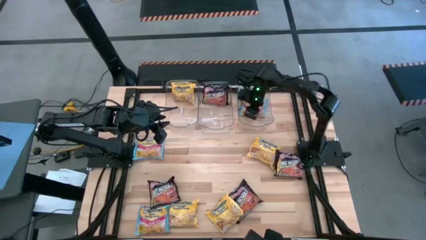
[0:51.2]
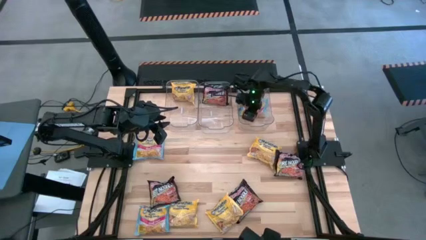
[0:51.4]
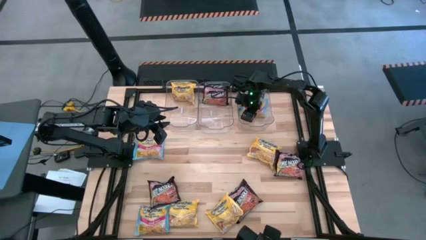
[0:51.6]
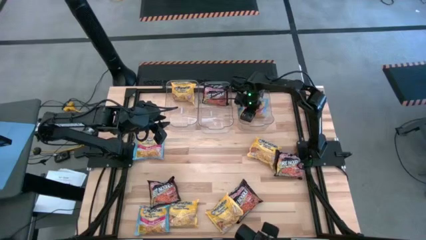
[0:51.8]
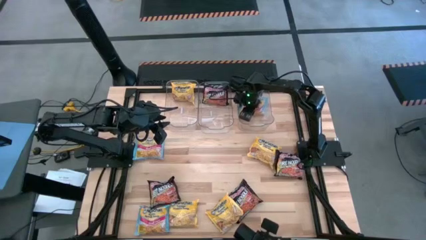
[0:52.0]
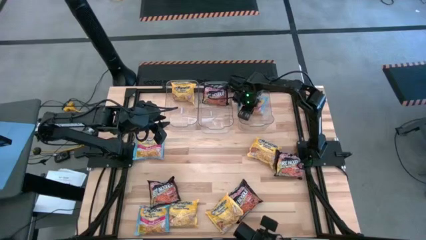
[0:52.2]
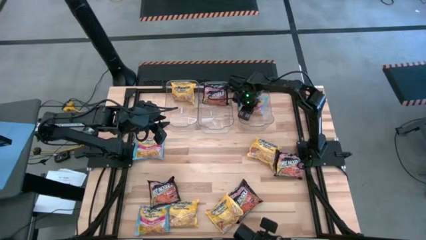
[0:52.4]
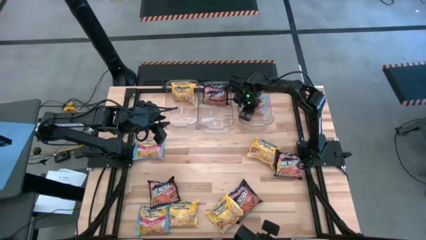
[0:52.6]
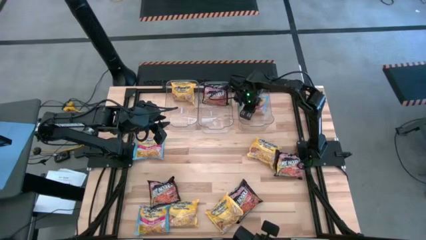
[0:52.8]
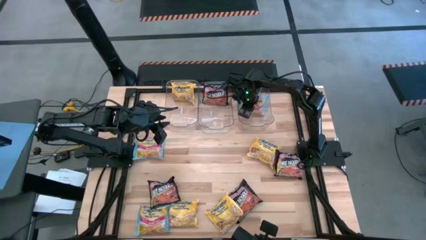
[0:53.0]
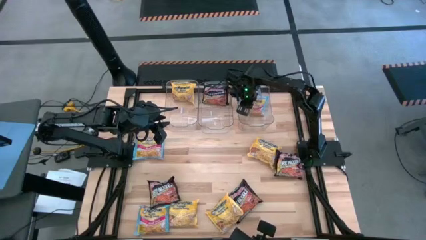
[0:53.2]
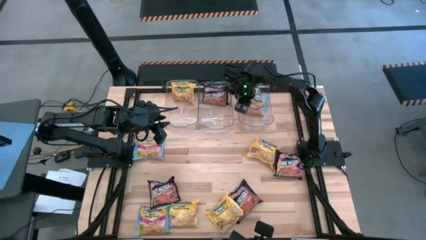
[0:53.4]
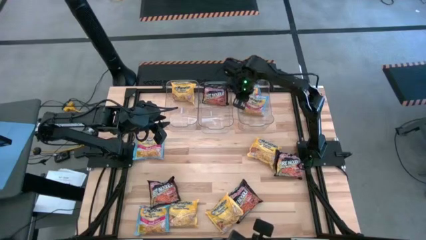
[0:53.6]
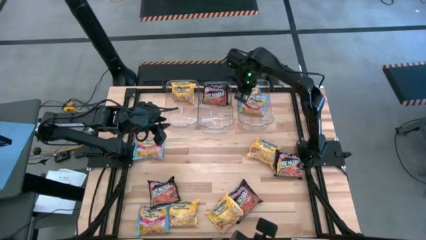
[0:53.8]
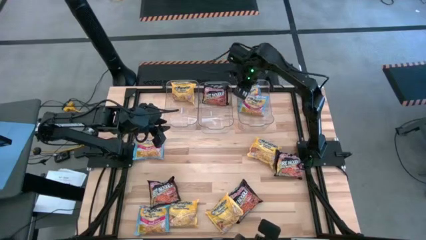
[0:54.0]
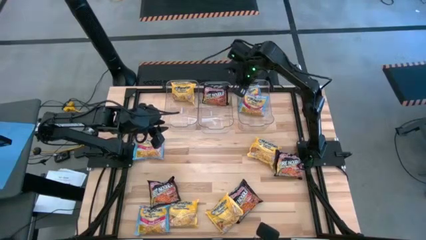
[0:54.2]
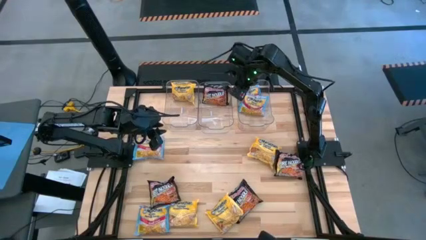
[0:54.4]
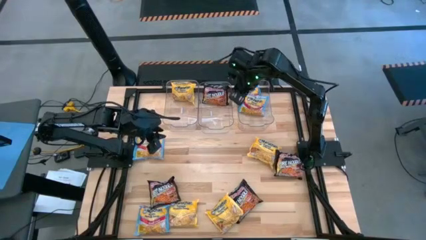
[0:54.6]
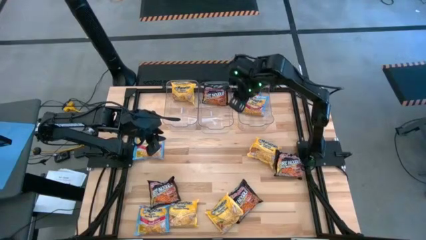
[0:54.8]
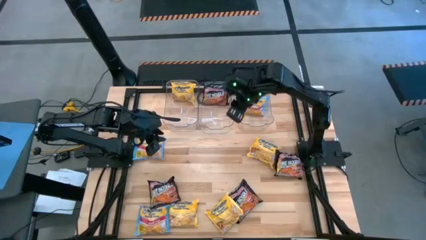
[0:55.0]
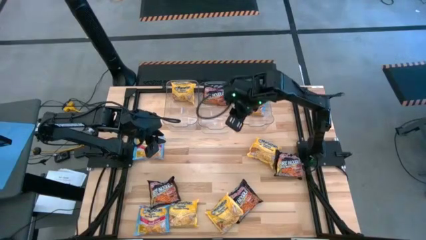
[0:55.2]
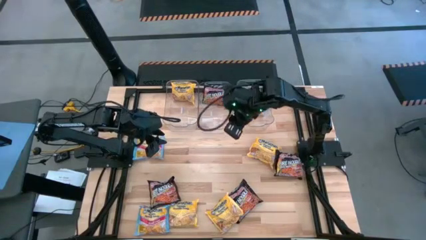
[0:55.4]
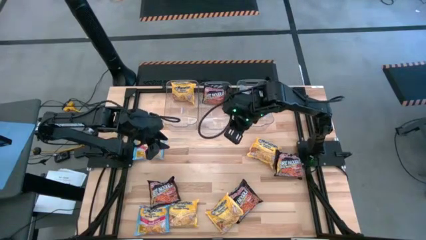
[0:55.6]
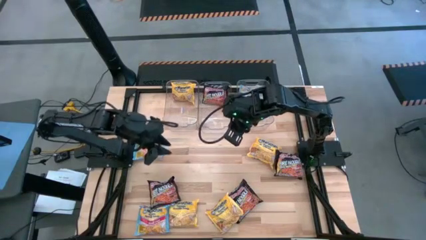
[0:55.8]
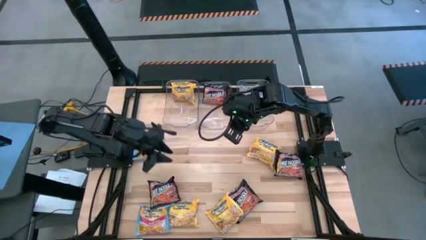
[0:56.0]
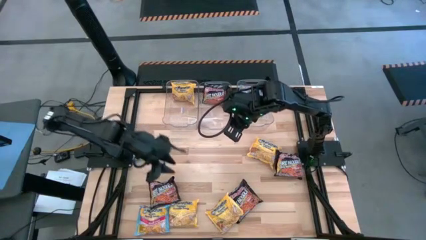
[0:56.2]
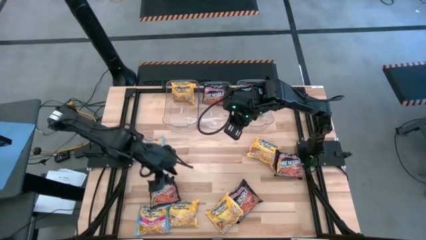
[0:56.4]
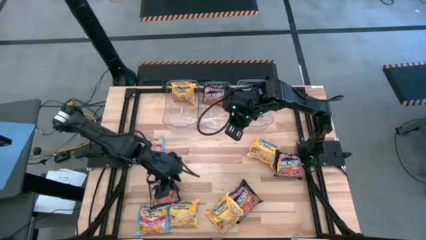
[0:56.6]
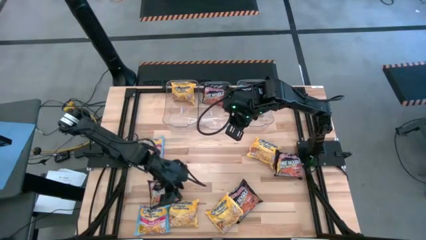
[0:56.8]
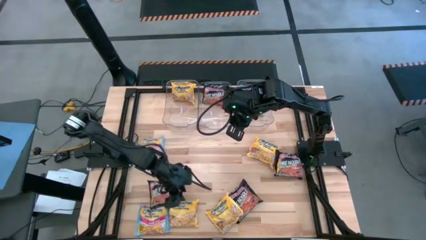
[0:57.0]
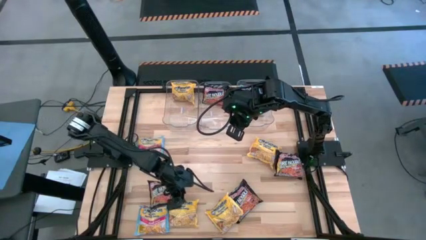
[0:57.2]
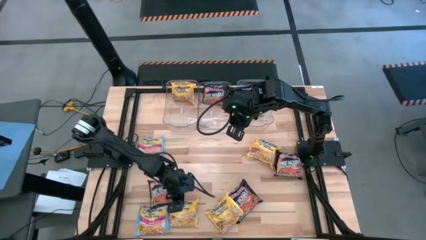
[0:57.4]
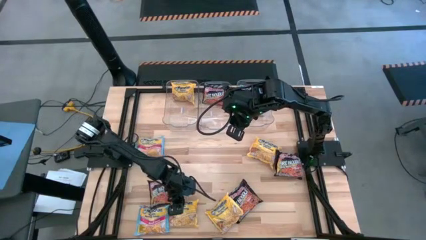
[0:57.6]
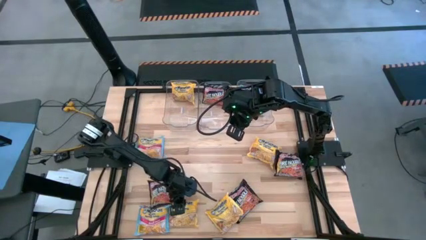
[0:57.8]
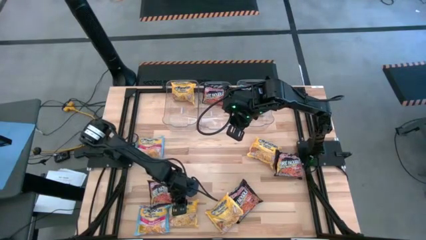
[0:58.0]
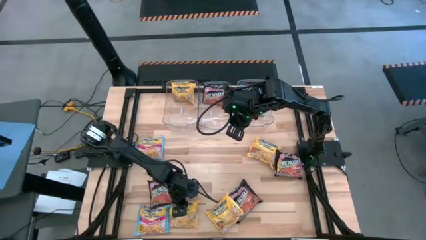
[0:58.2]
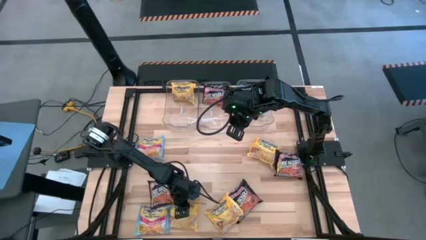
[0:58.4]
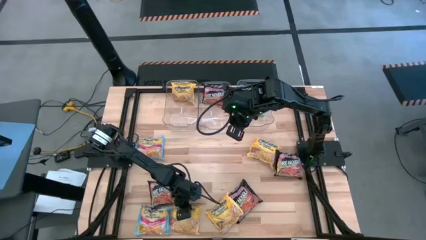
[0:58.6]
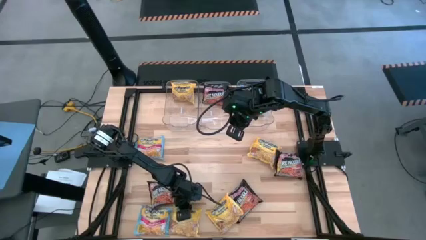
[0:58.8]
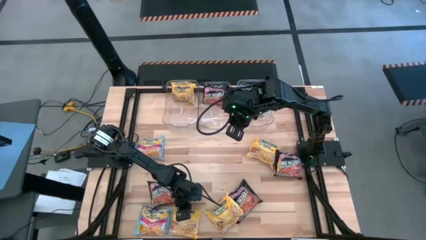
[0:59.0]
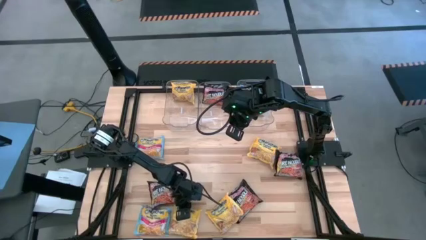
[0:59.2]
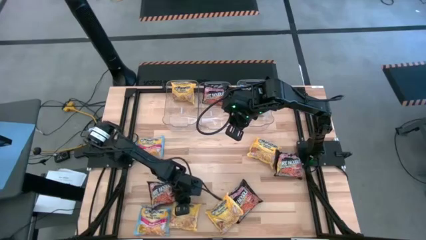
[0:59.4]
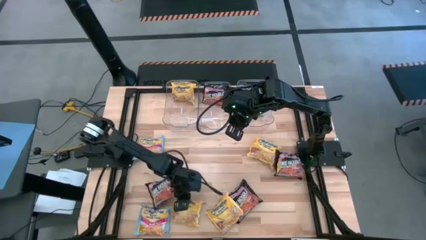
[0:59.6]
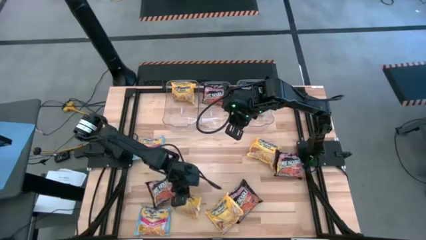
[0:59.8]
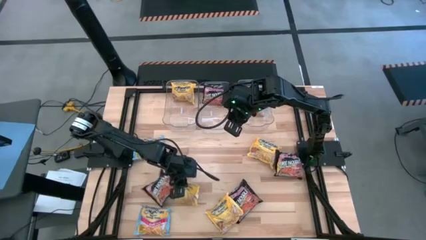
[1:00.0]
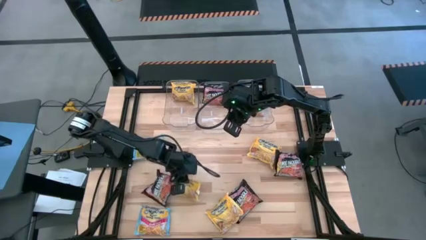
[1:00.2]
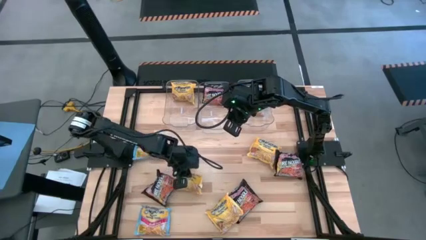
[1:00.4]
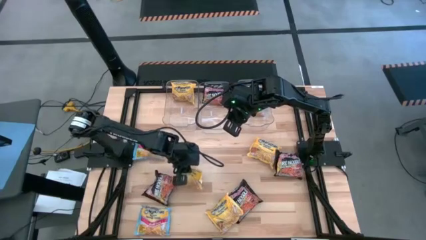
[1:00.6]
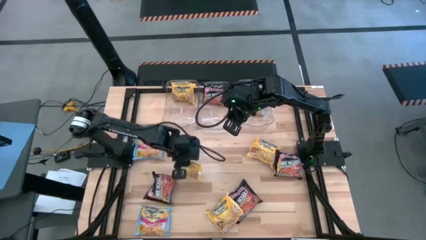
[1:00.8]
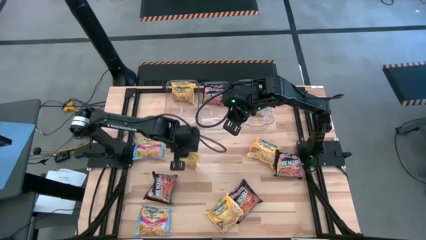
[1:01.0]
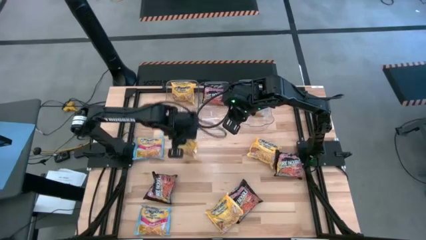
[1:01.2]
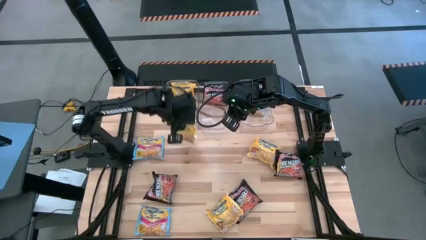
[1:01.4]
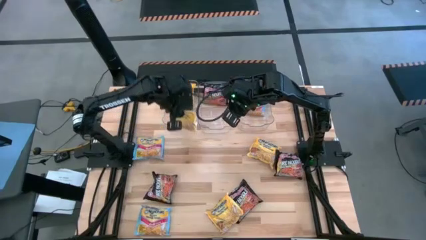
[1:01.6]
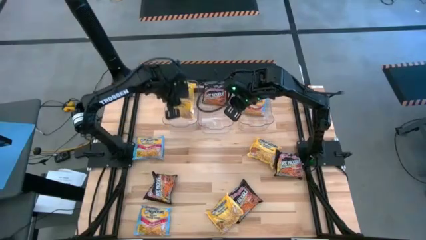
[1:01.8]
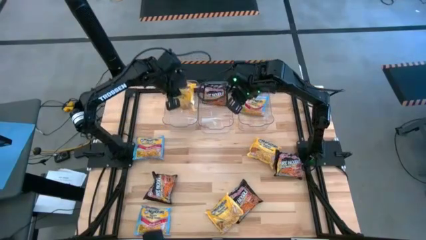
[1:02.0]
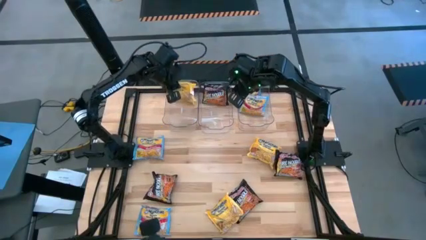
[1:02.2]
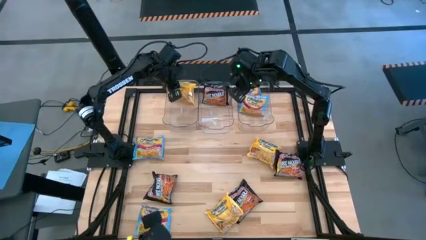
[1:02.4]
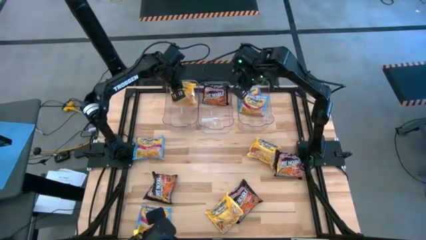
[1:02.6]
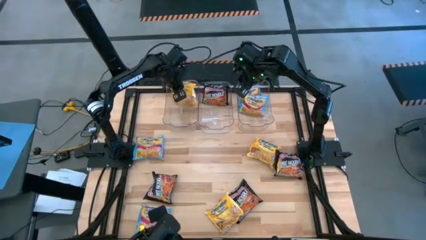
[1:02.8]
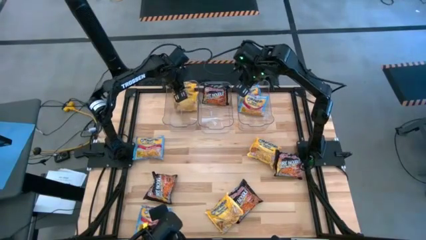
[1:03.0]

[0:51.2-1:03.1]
Task: Sort Maruchan noodles
Put the yellow noodle pack in the left transparent bin

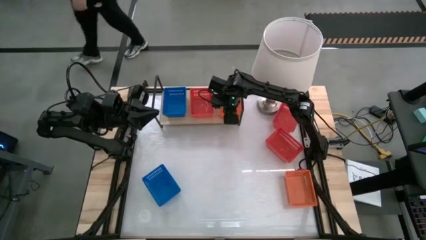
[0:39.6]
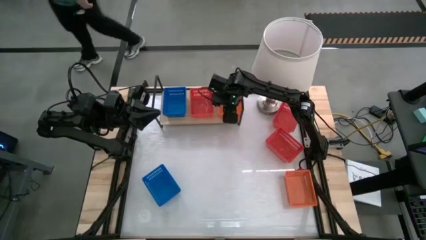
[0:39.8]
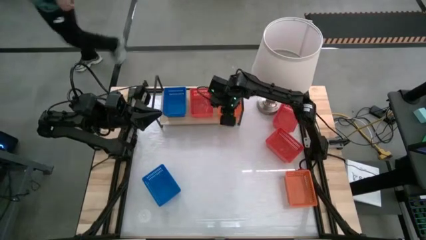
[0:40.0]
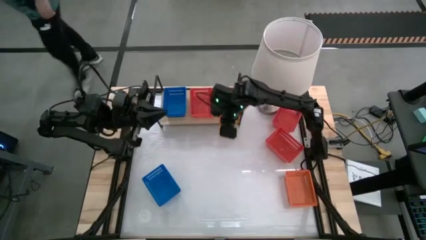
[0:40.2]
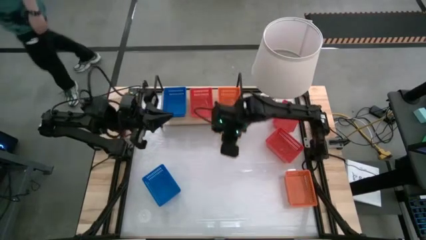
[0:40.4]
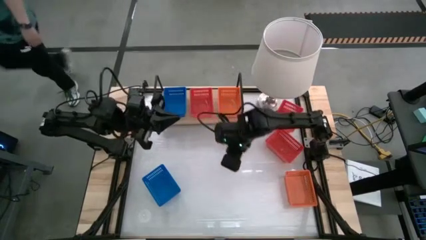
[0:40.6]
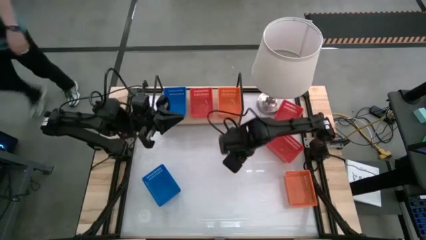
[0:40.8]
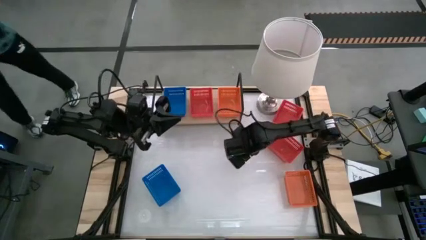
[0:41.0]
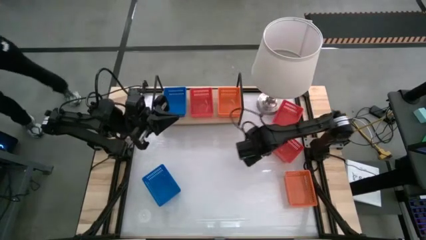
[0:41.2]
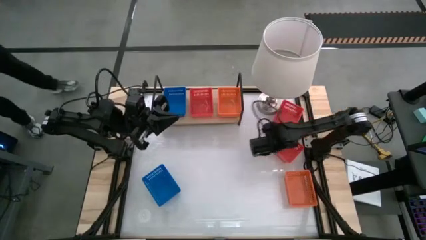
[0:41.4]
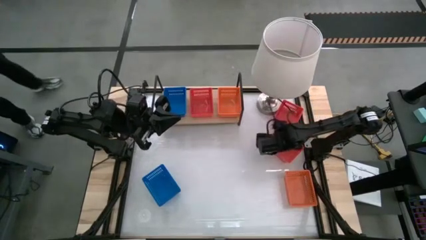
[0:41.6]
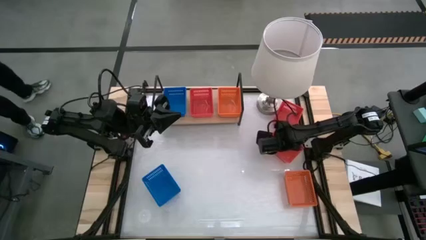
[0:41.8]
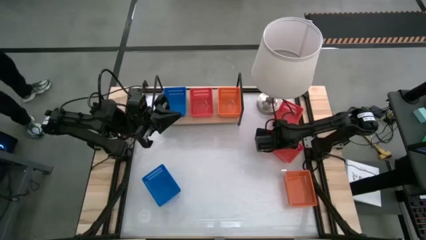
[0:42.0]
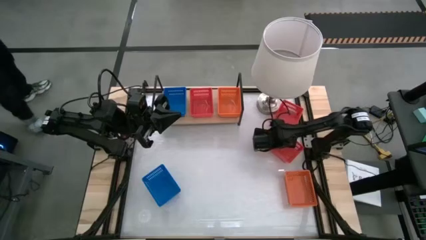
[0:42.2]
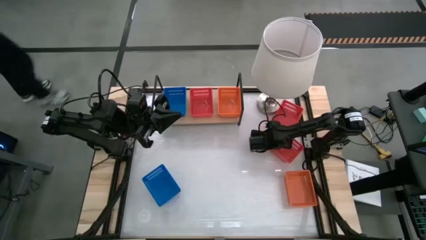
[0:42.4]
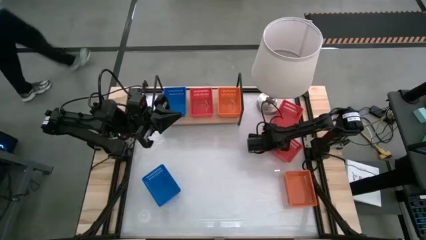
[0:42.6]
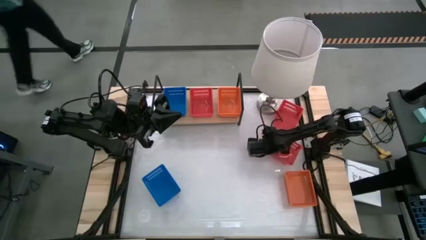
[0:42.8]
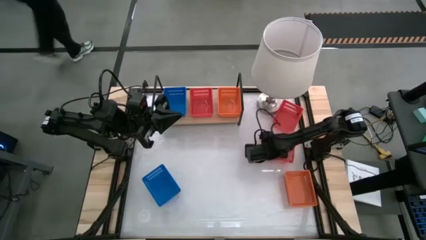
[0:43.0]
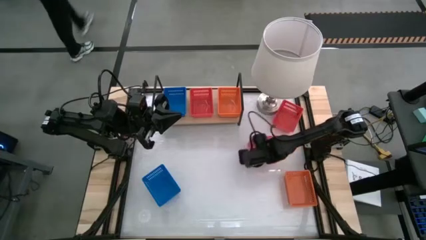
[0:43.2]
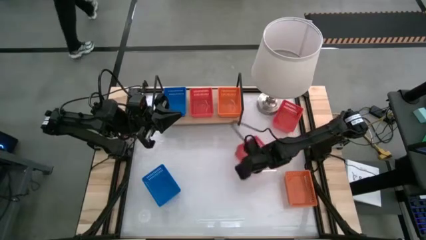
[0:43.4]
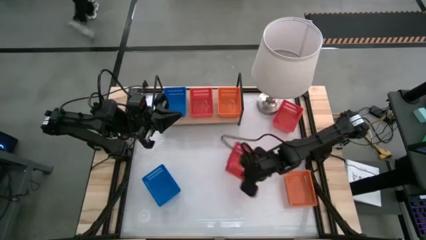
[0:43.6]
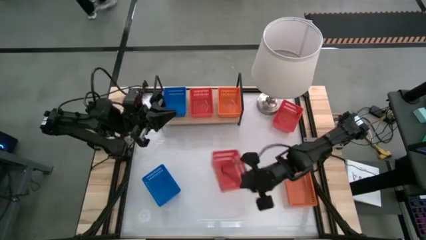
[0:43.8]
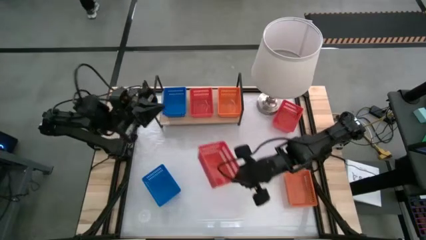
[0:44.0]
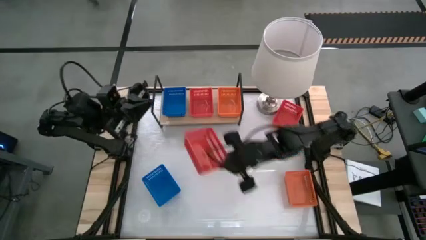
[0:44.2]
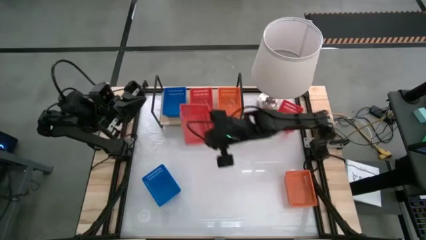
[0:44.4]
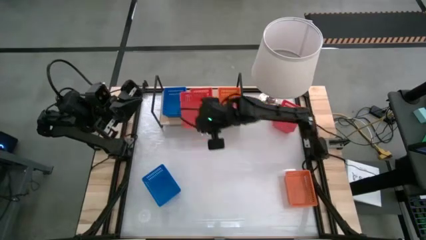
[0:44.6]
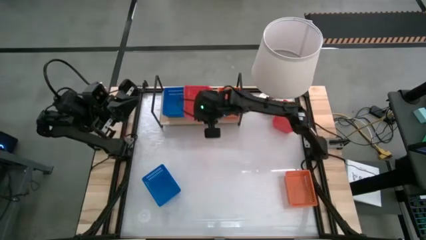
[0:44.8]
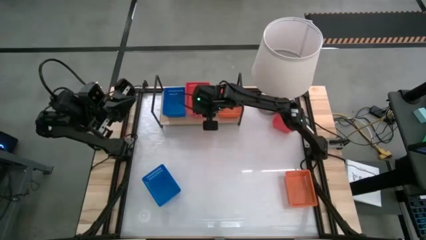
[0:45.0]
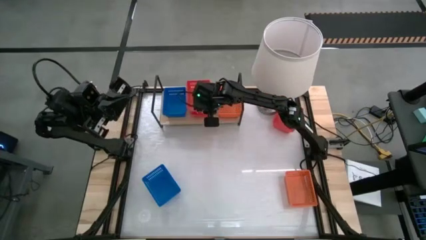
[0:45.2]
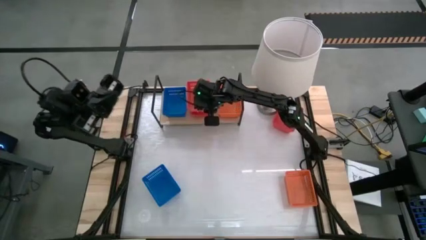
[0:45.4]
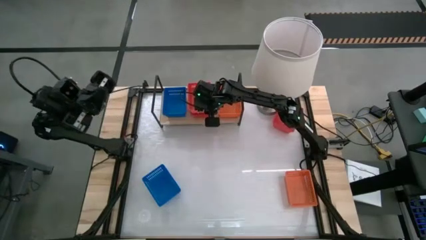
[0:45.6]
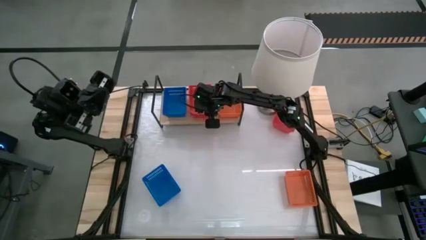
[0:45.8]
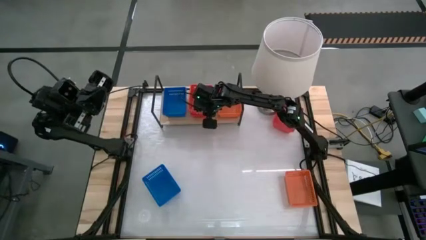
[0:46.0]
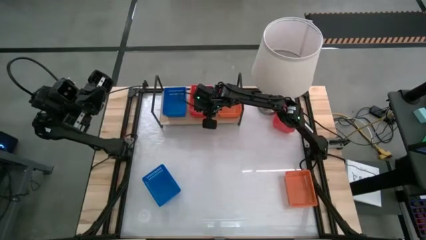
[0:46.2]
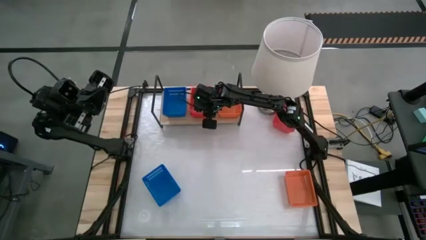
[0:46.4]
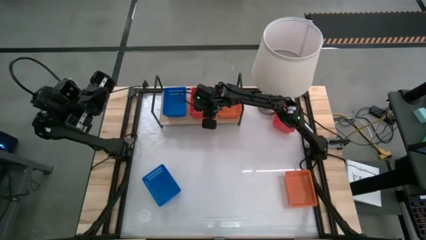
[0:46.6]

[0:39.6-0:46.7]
Task: Stack baskets on shelf by color
Stack the bottom red basket on top of the red basket on the shelf
